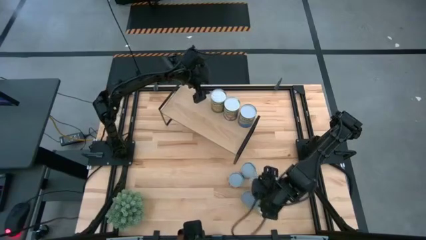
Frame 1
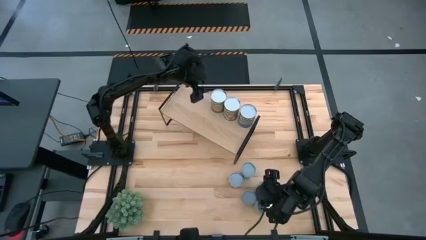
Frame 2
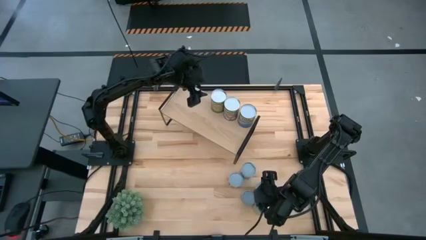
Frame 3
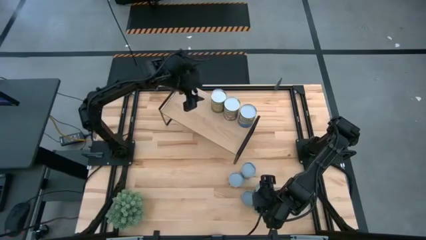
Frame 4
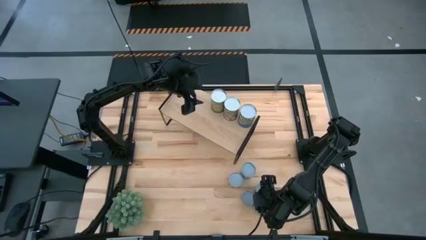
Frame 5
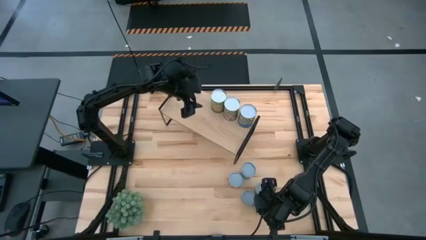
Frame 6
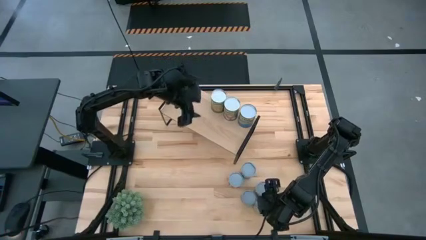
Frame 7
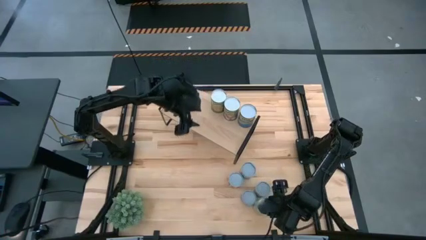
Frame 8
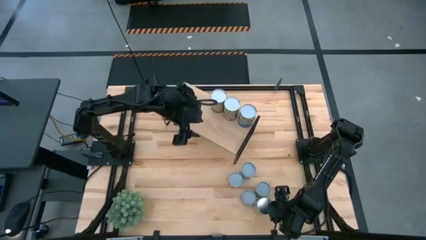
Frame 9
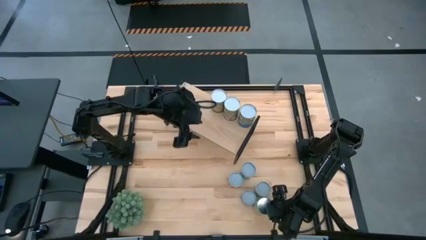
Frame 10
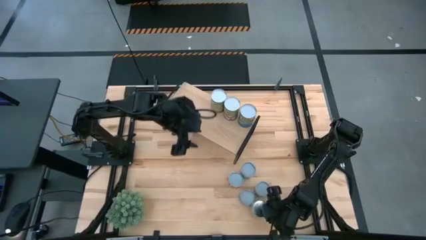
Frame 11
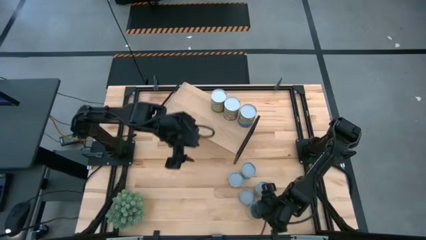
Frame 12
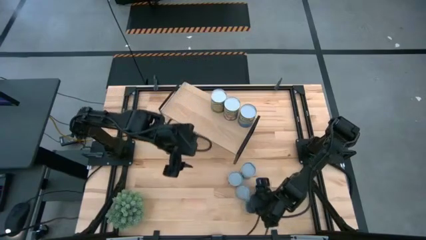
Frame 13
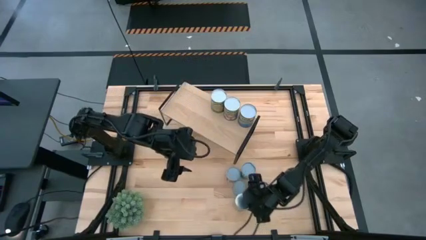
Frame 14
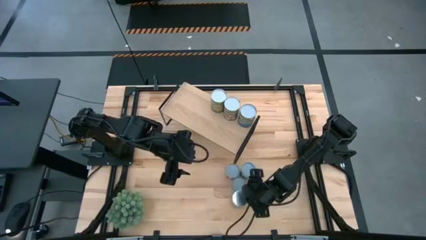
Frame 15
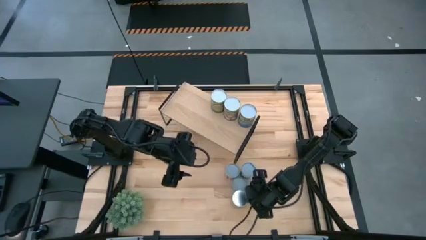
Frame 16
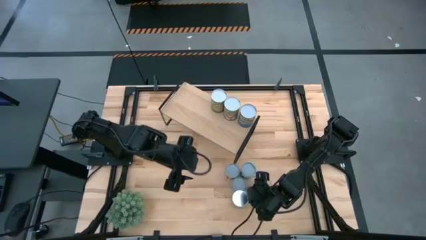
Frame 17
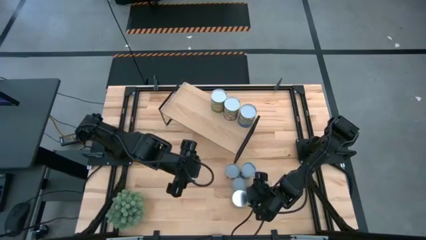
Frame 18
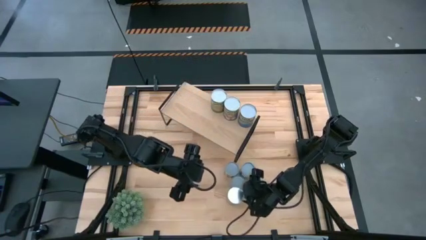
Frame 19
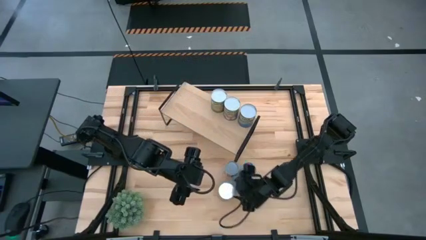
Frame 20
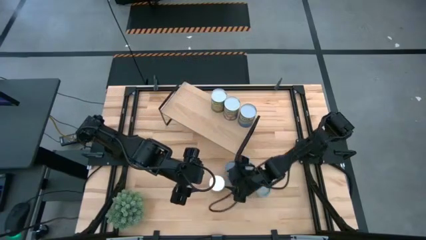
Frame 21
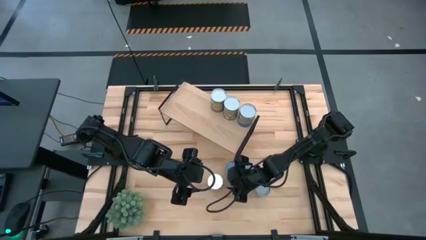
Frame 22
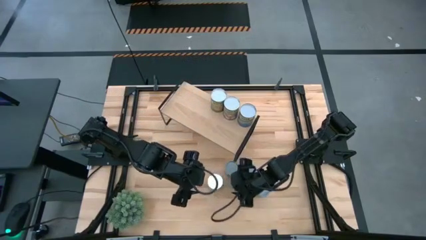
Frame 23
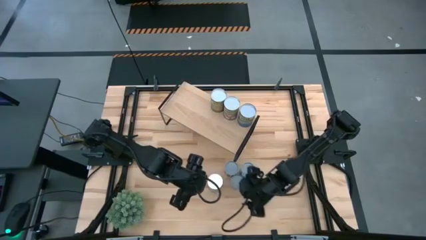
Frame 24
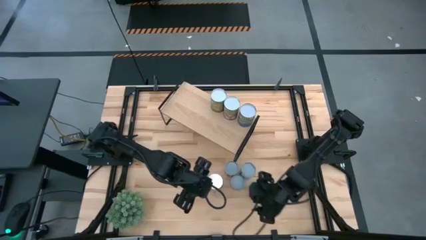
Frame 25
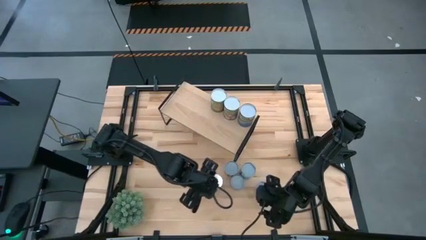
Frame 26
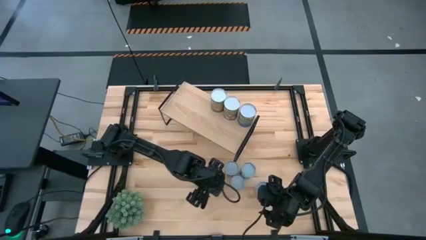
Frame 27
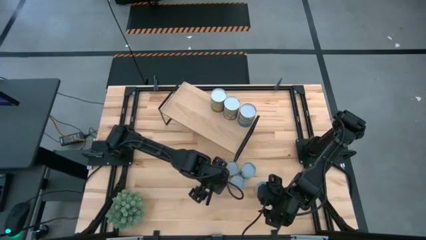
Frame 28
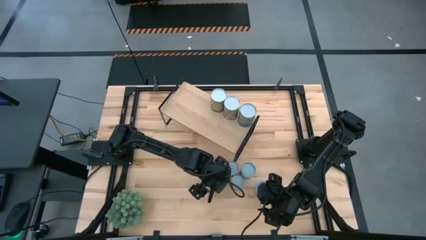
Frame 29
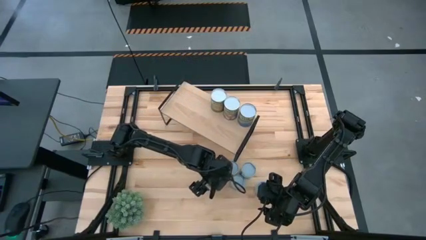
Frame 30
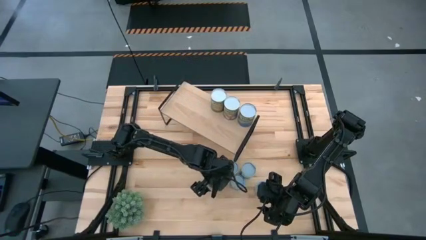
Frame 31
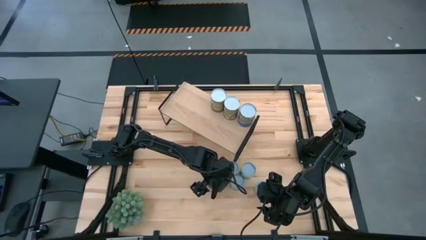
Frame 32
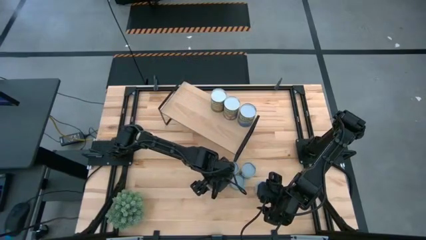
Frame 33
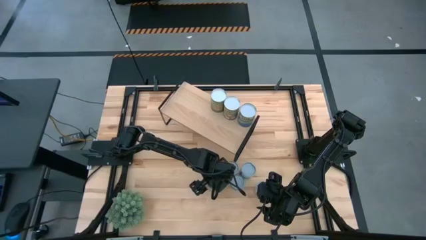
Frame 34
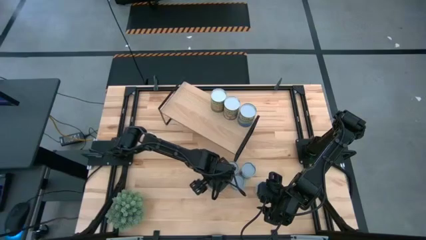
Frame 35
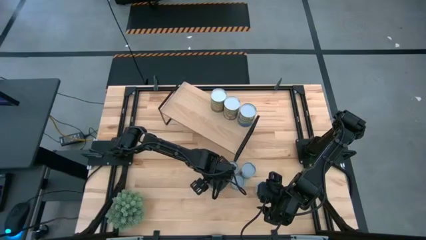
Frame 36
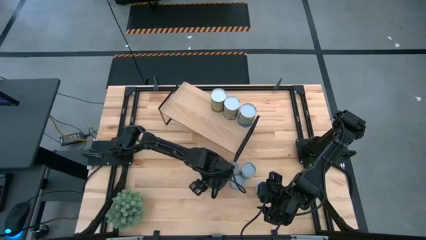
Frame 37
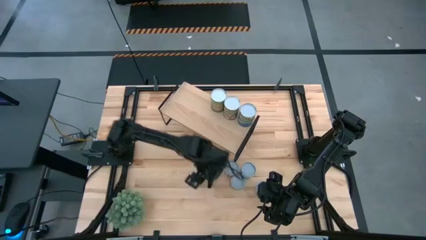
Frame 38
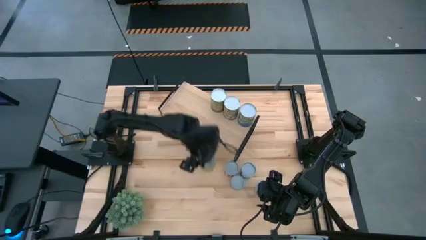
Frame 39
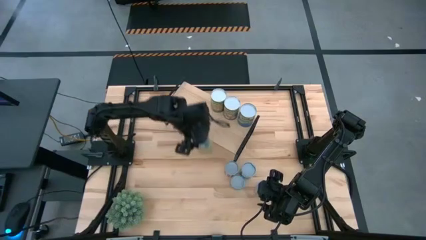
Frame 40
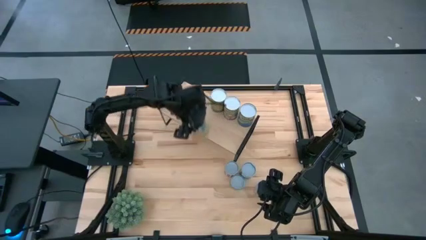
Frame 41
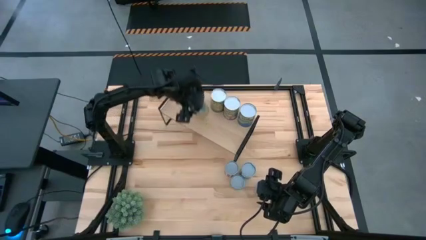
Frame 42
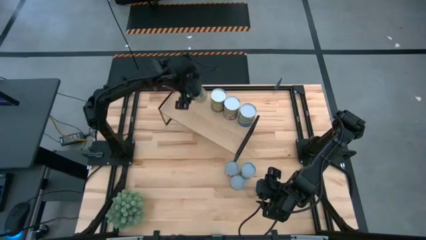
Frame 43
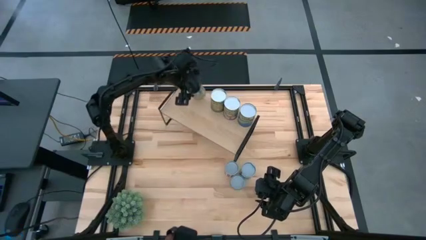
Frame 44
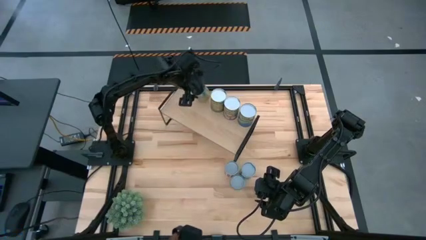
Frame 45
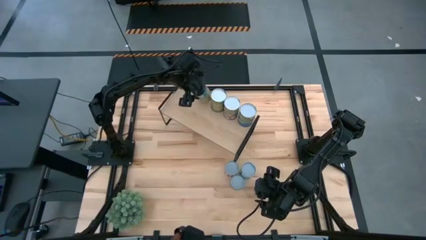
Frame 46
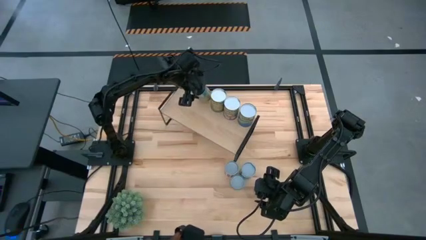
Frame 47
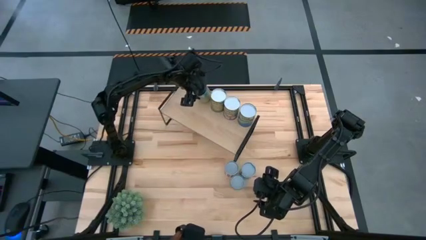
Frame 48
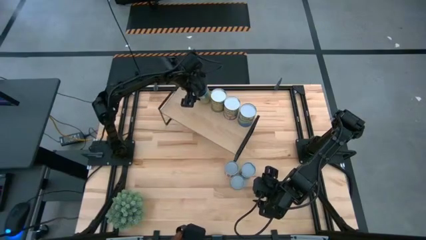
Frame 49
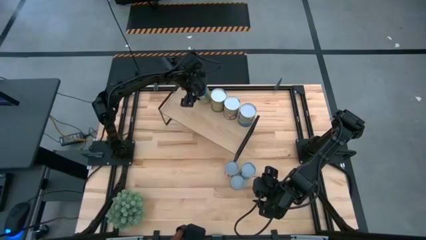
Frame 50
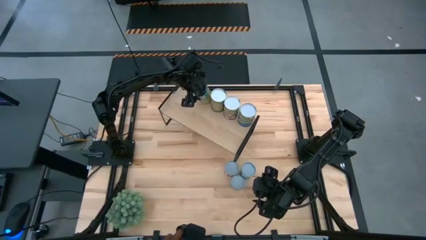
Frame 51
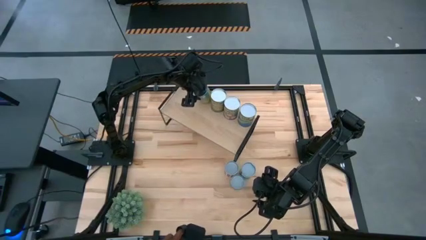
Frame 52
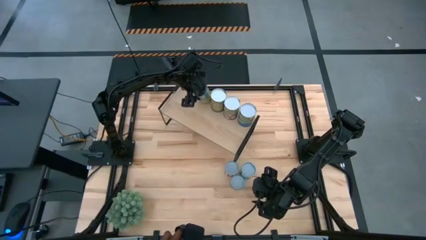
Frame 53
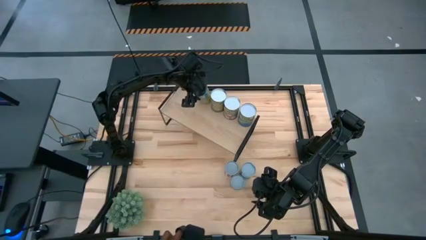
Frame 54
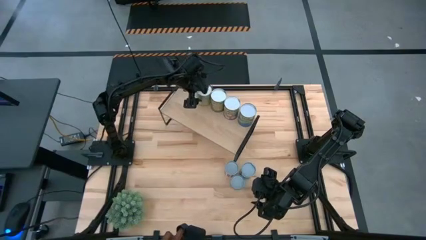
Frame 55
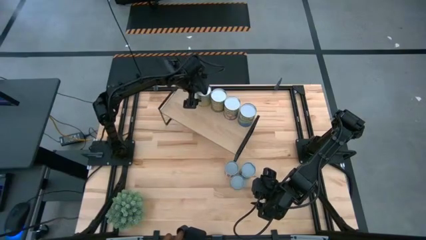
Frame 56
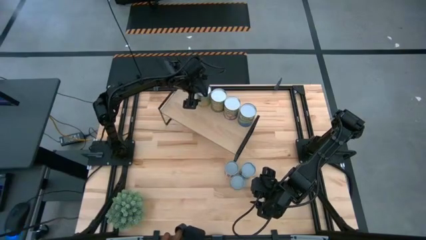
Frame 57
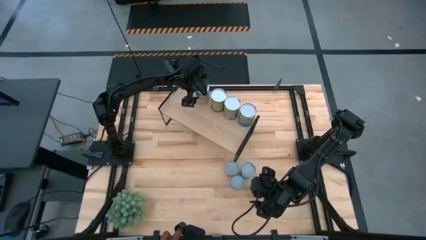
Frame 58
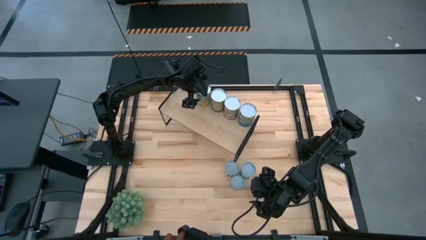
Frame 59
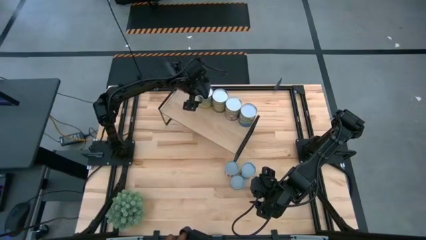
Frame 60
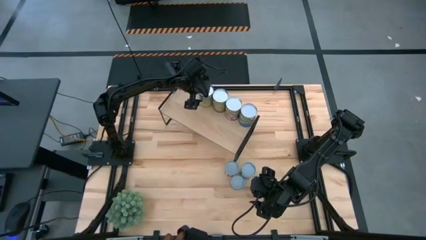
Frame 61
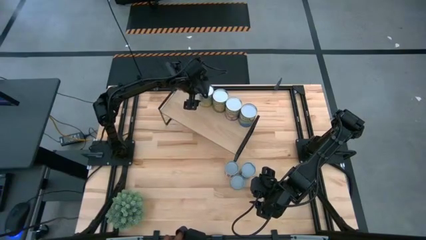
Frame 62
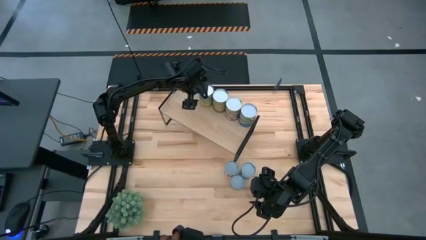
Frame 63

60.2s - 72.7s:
Task: Pick and place cans onto a shelf
Put the canned carrots on the shelf
